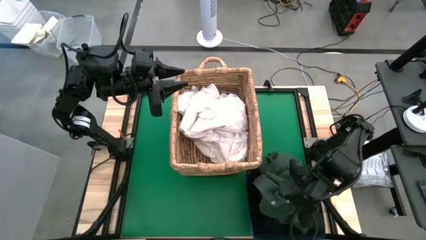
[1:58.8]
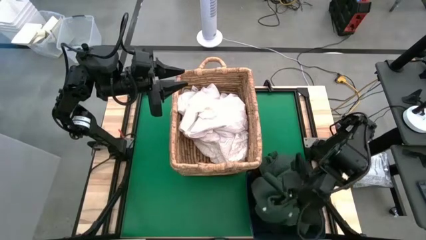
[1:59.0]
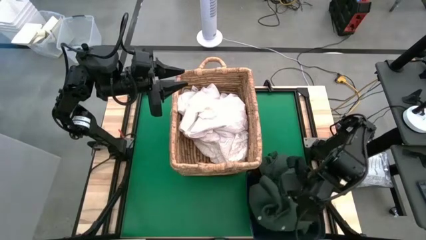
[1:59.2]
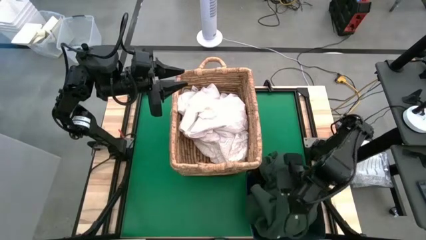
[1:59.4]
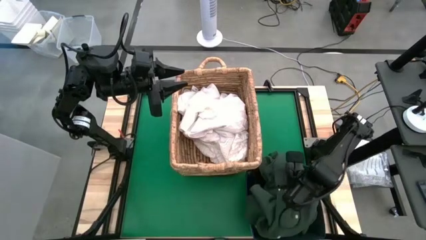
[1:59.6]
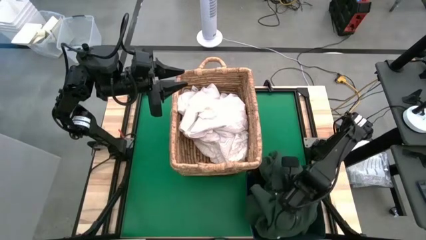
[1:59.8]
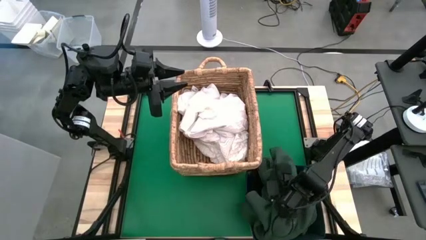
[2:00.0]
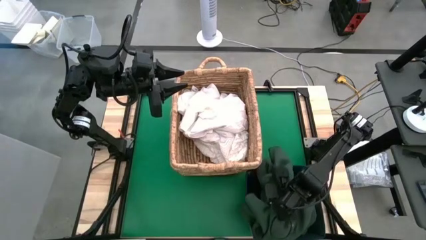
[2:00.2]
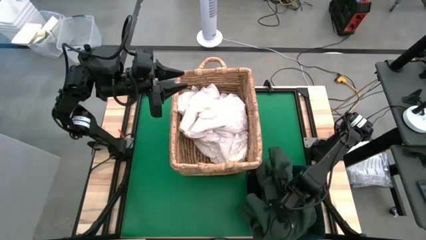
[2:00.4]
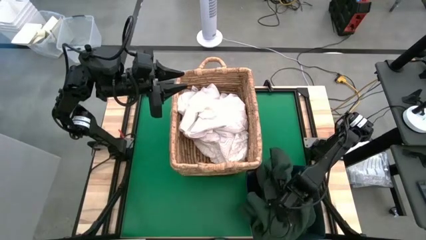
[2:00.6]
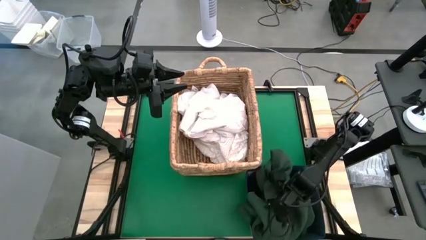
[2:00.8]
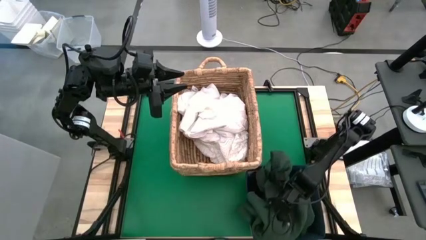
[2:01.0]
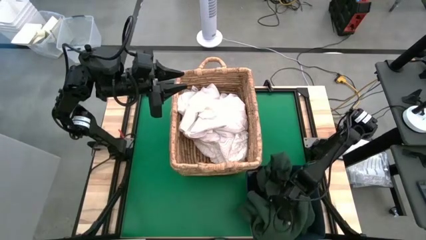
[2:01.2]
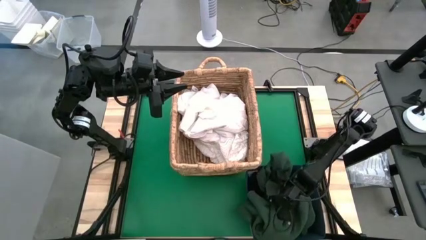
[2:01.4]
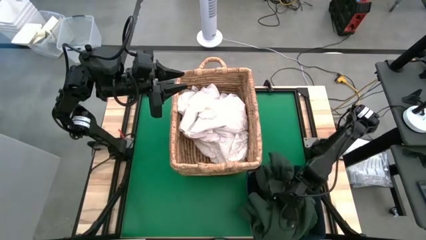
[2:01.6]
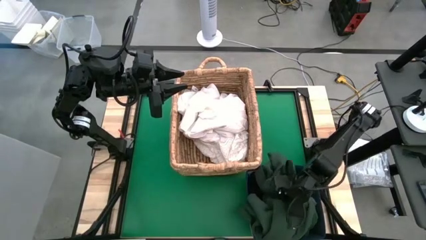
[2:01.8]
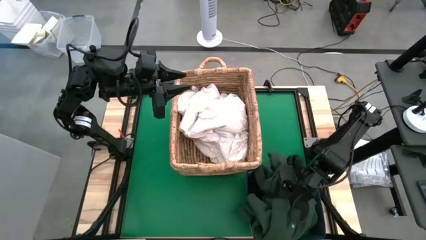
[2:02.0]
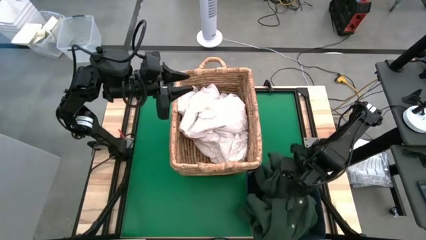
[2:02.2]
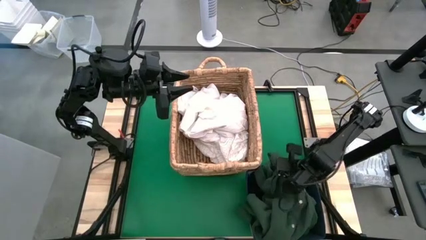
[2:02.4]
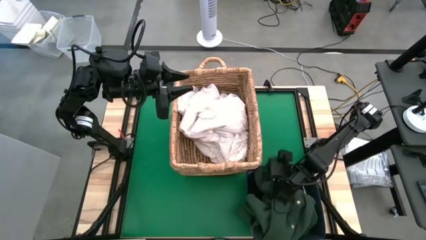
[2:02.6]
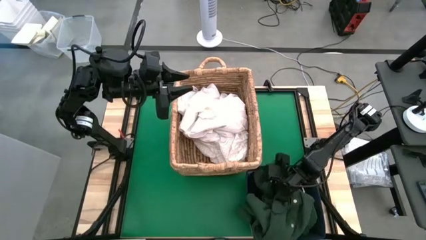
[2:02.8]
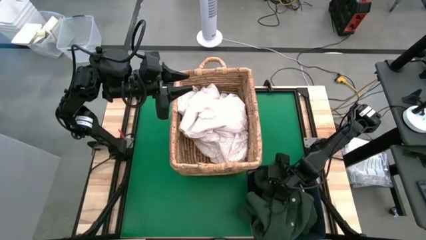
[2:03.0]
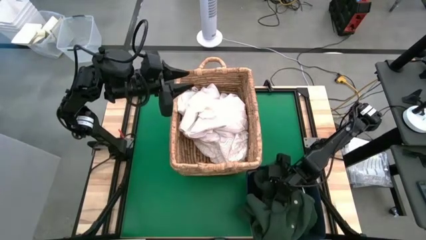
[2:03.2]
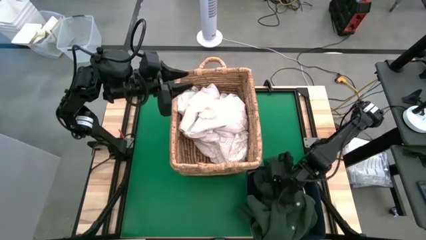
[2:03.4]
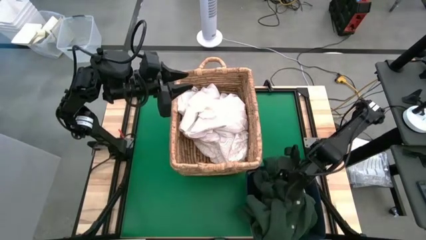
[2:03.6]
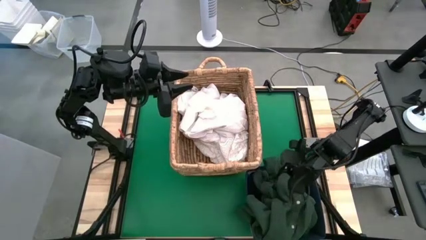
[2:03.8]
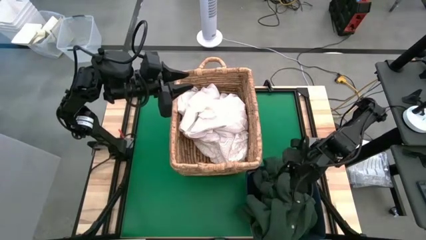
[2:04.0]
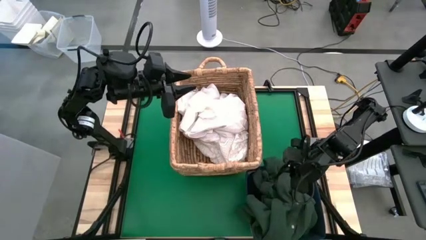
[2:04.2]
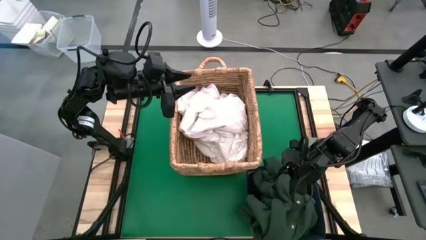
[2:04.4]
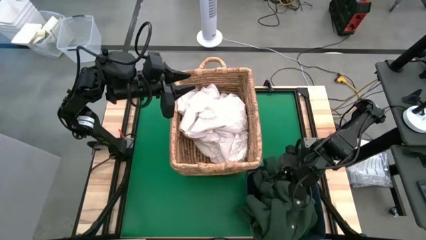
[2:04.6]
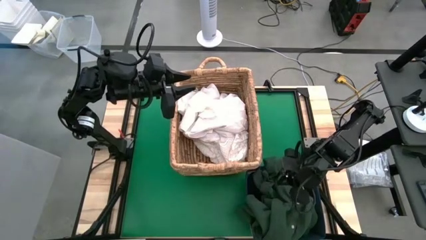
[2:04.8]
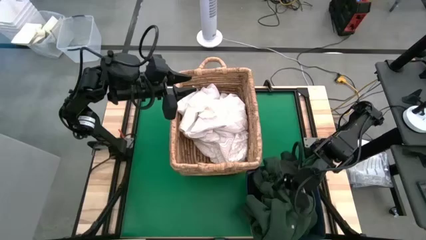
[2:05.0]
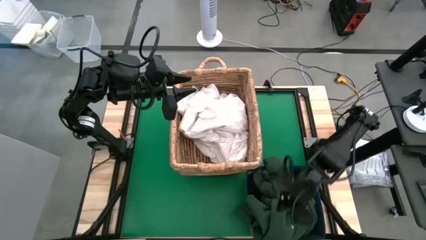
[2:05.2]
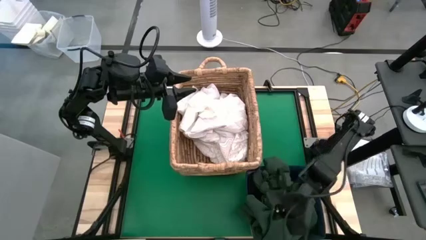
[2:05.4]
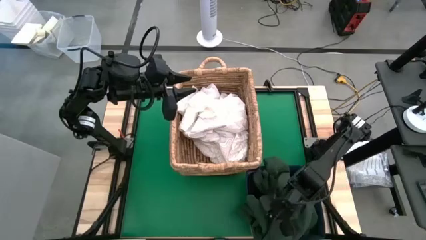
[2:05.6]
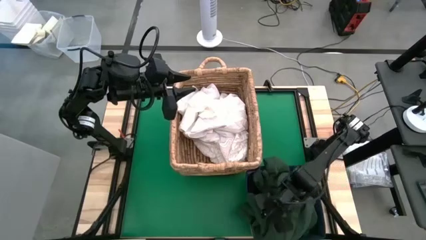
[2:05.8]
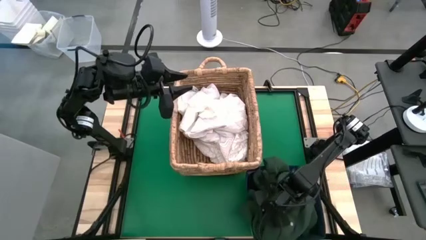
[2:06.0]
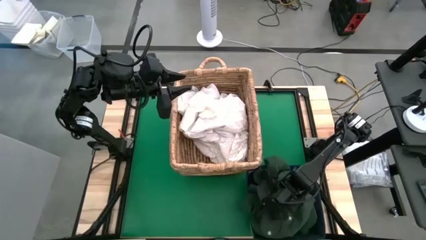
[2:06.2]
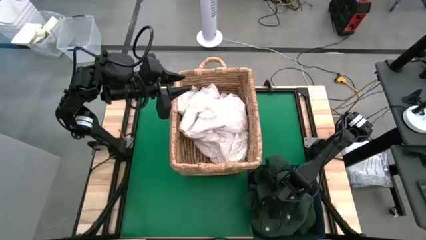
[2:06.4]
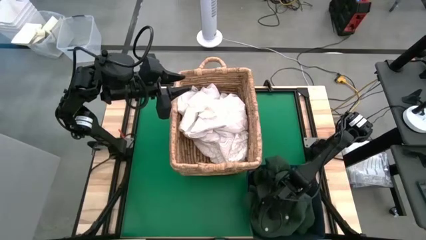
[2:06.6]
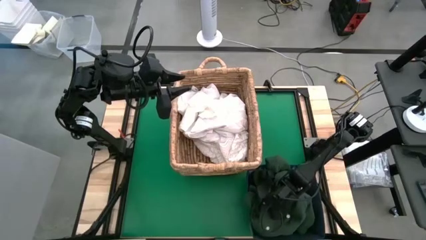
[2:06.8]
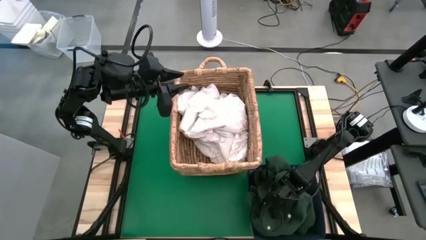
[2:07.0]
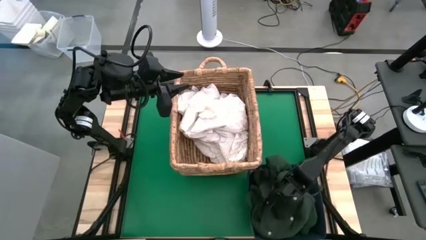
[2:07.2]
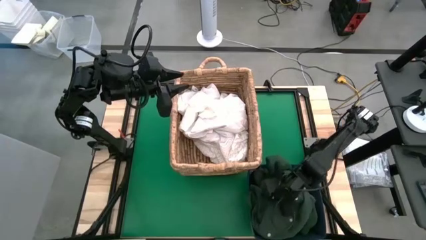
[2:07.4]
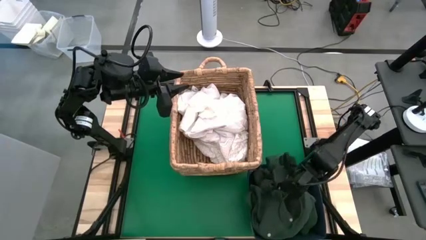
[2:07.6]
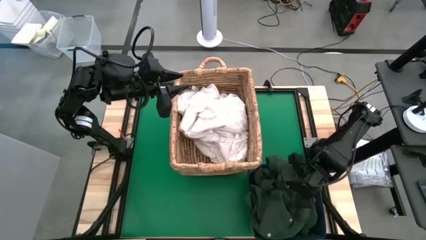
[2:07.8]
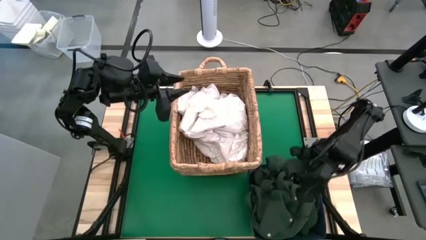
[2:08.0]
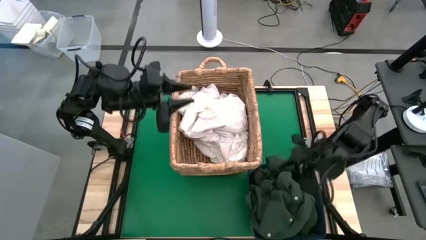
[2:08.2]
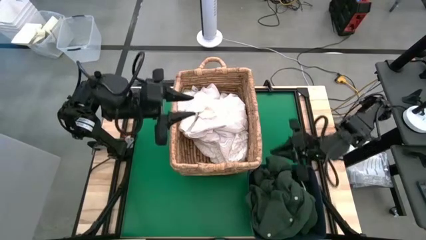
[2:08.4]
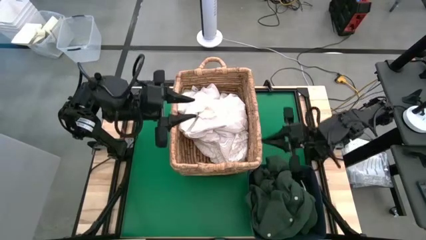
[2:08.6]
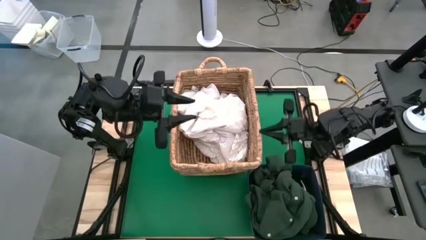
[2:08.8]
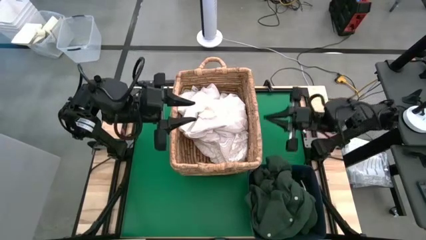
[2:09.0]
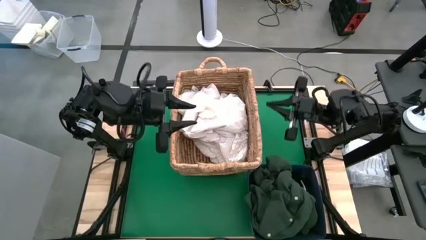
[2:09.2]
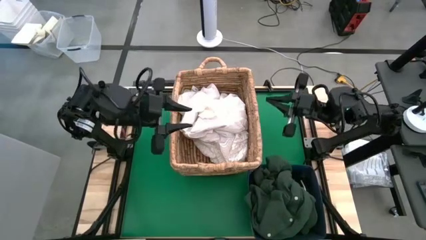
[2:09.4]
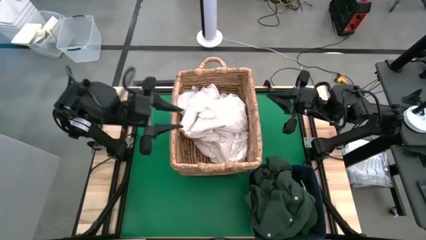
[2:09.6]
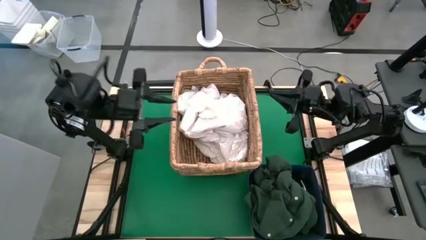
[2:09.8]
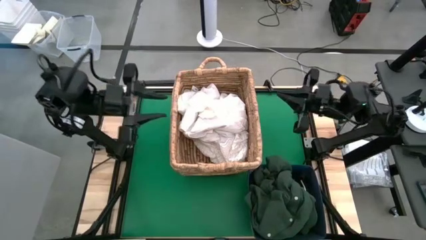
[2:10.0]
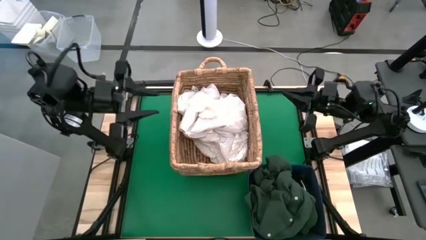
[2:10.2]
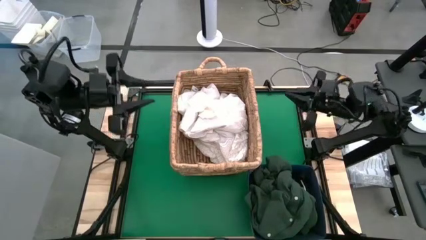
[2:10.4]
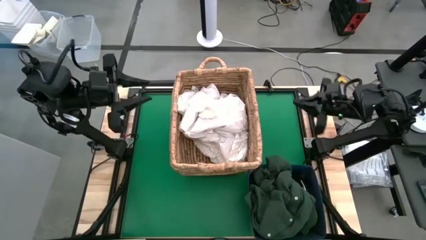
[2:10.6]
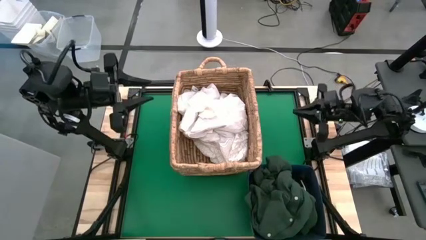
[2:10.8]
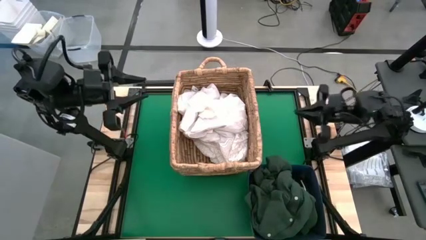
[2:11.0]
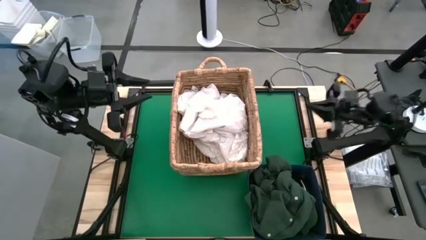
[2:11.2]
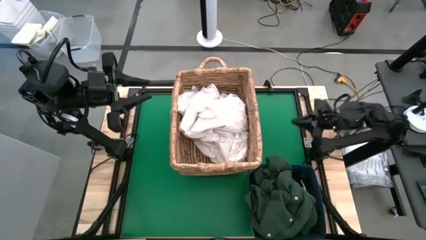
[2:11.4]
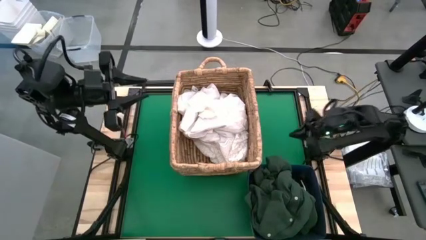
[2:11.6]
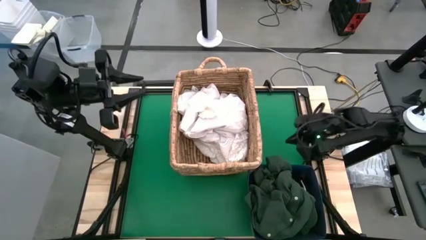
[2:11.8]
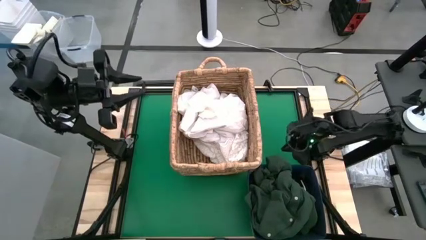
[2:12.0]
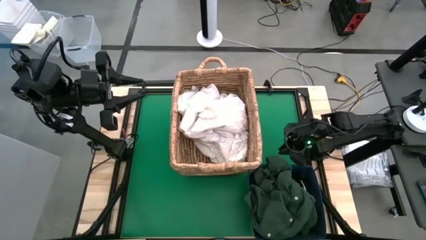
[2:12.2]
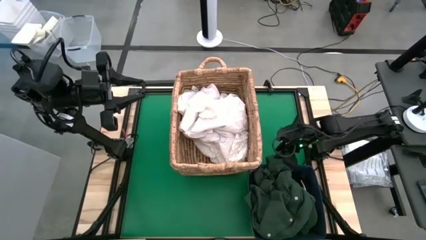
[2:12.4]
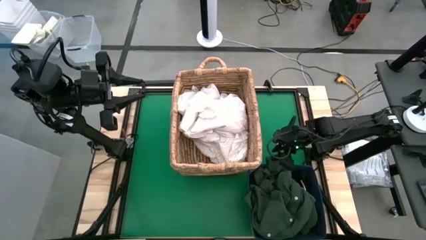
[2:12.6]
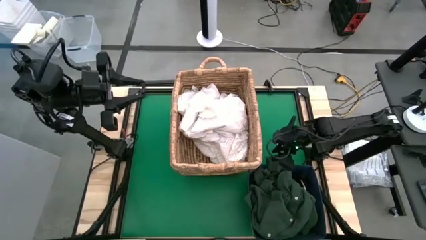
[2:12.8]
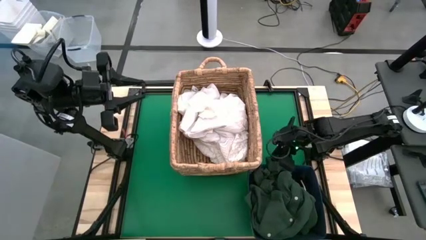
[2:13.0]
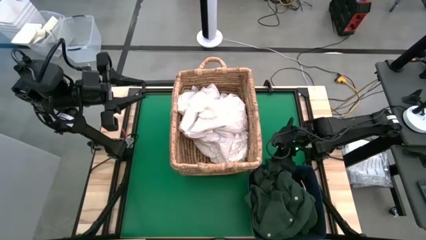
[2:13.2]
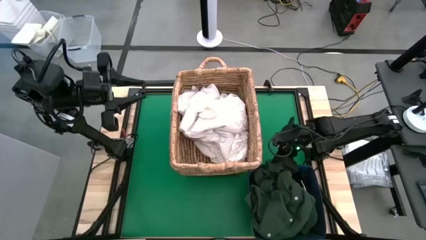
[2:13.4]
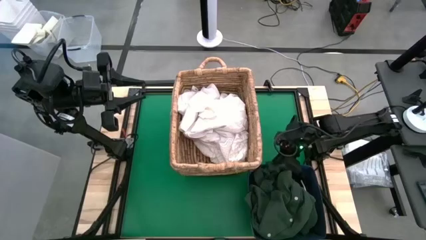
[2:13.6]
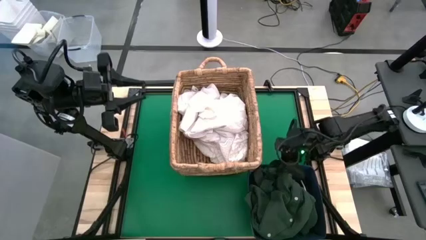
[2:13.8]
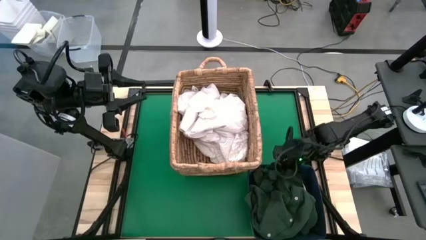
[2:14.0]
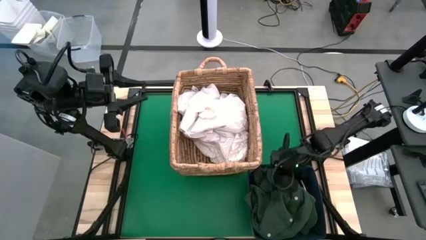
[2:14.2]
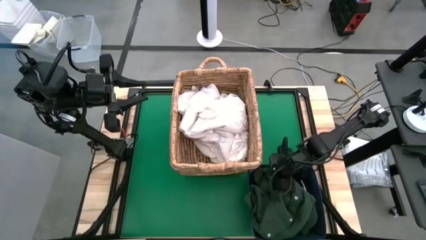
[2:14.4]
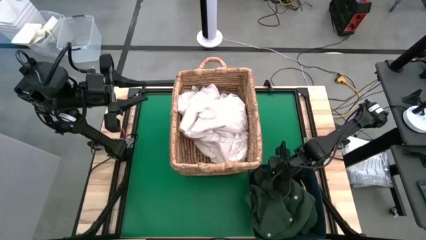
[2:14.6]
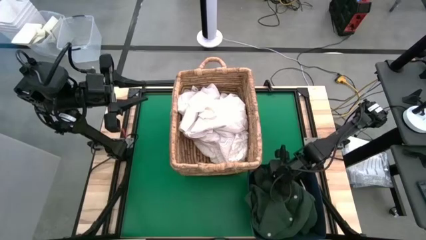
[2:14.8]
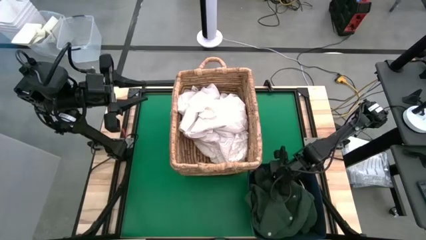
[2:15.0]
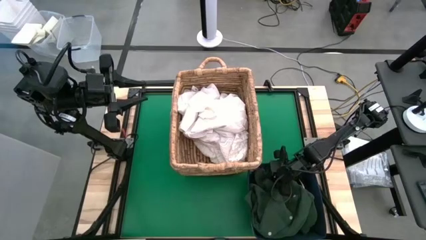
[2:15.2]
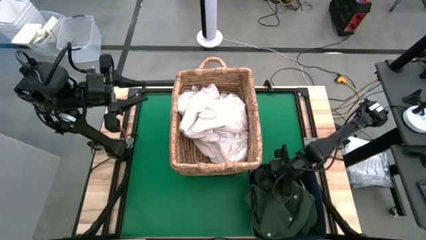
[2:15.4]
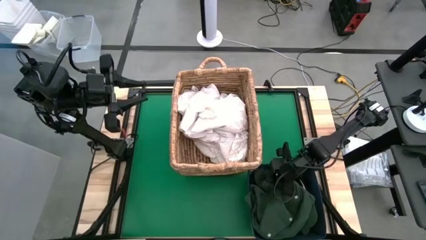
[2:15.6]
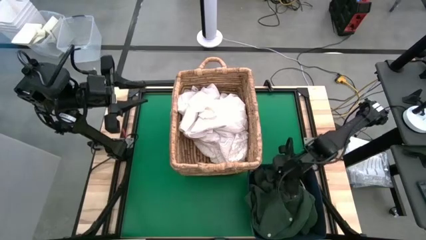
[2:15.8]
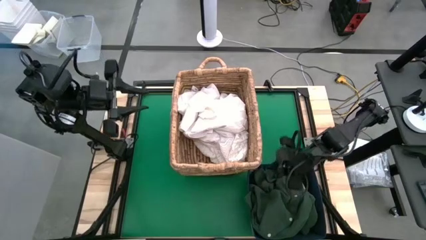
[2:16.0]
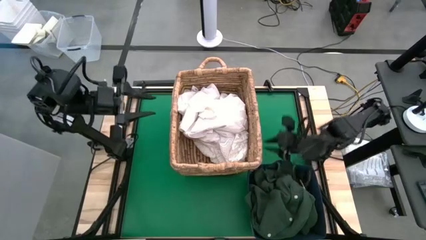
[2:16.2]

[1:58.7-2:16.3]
Put the green polo shirt into the laundry organizer
